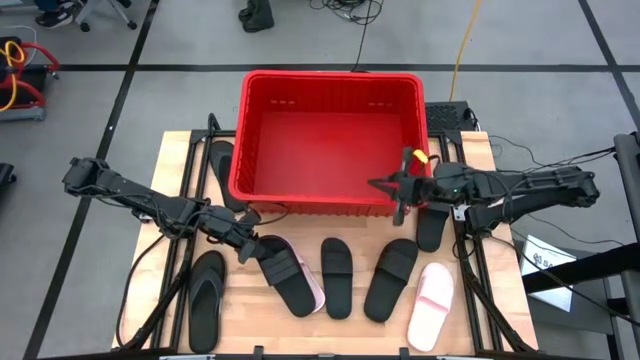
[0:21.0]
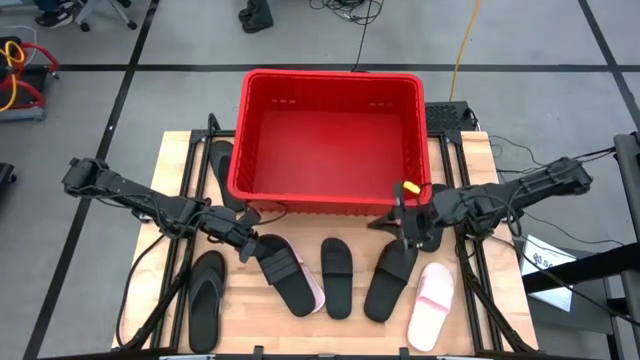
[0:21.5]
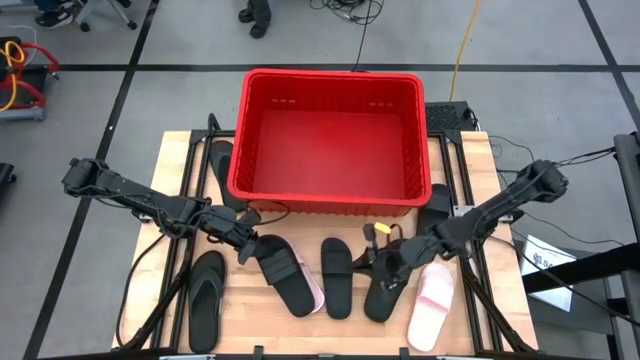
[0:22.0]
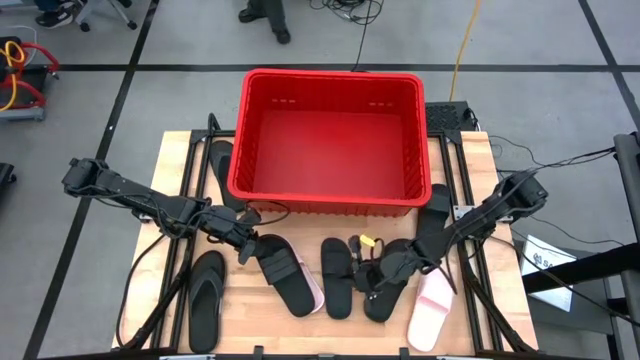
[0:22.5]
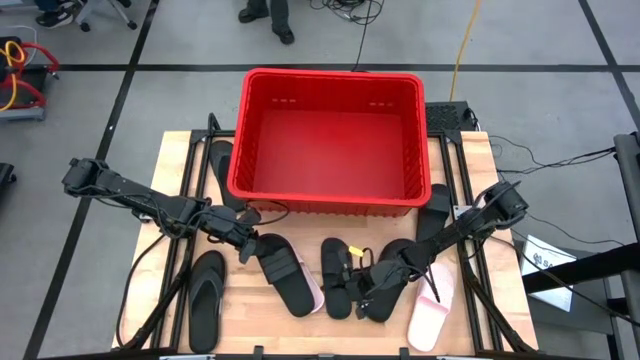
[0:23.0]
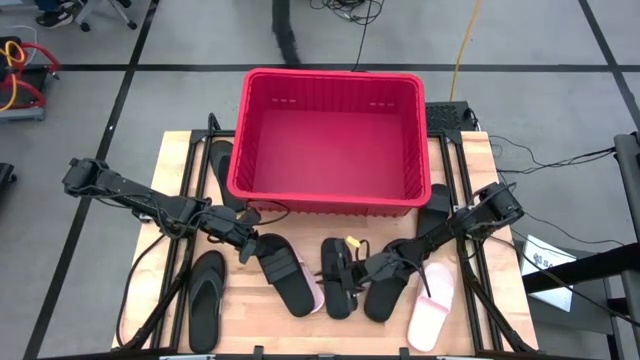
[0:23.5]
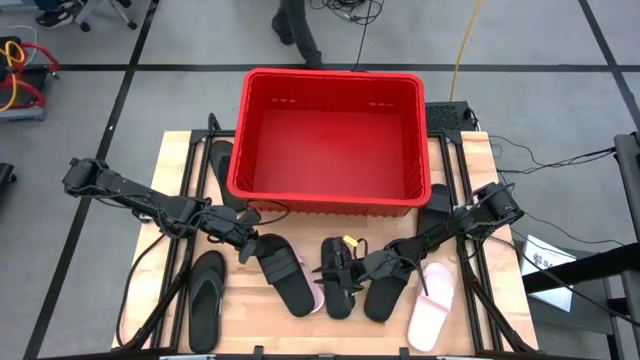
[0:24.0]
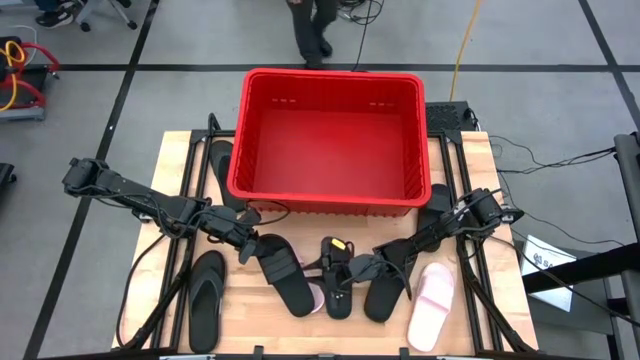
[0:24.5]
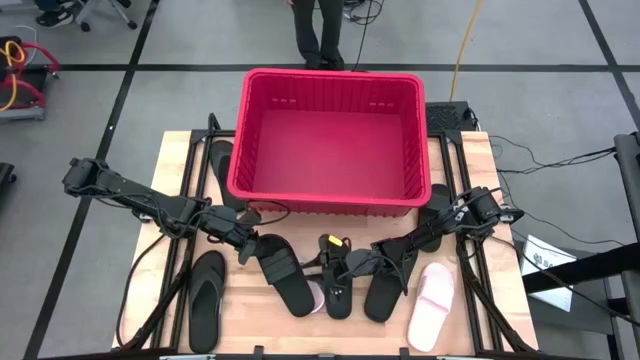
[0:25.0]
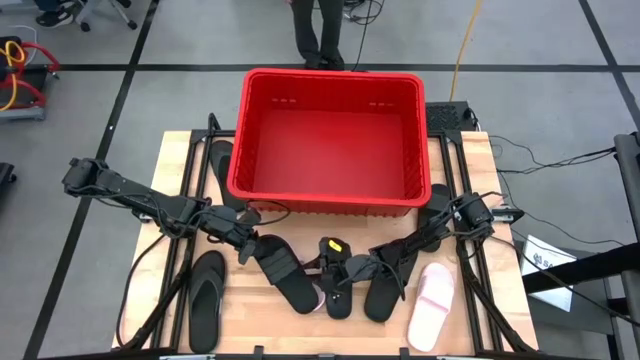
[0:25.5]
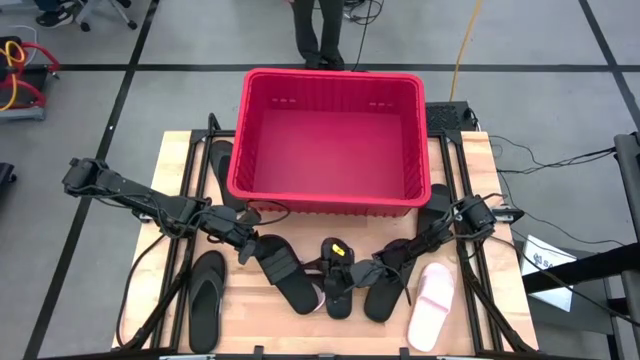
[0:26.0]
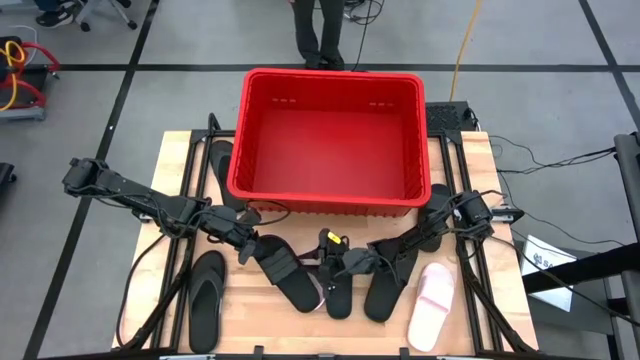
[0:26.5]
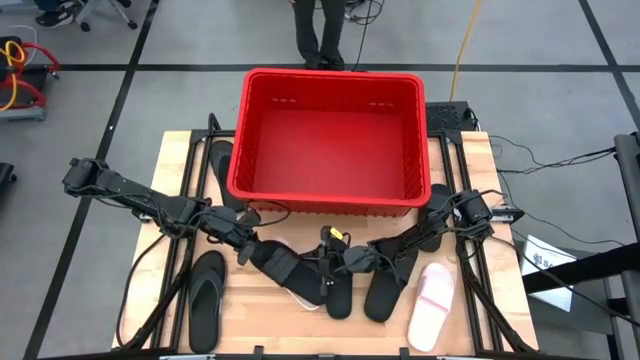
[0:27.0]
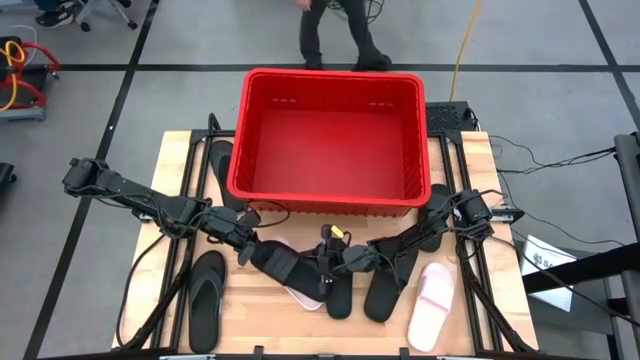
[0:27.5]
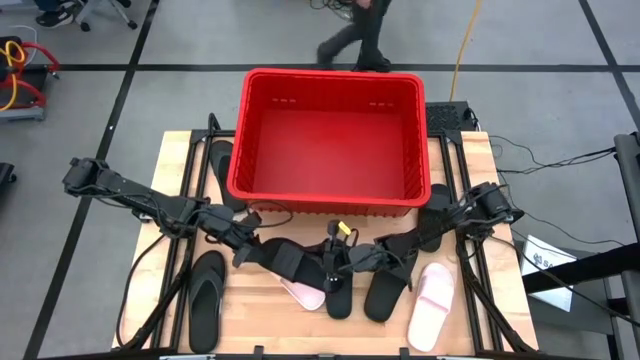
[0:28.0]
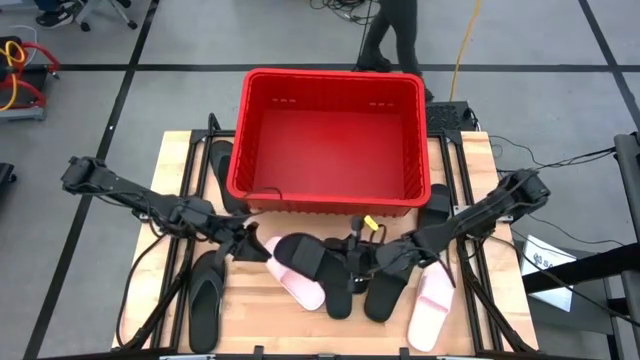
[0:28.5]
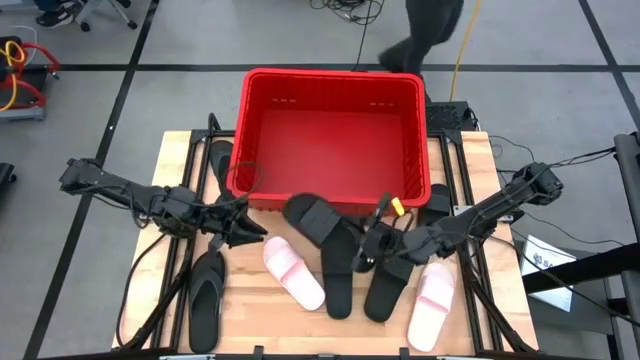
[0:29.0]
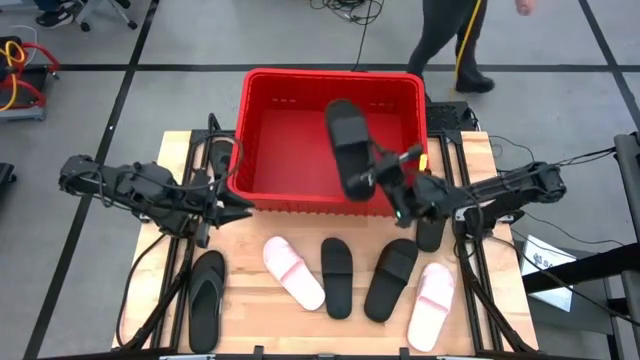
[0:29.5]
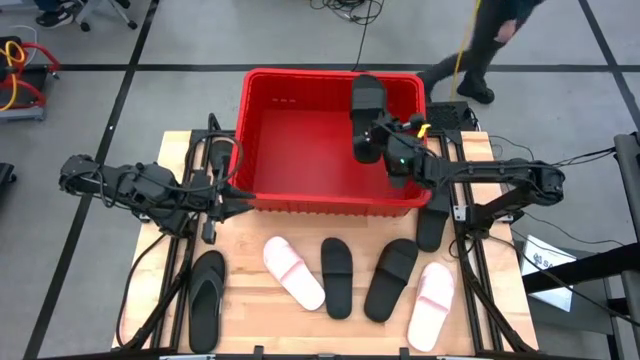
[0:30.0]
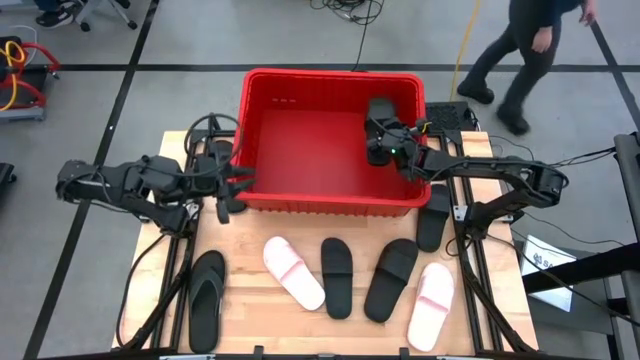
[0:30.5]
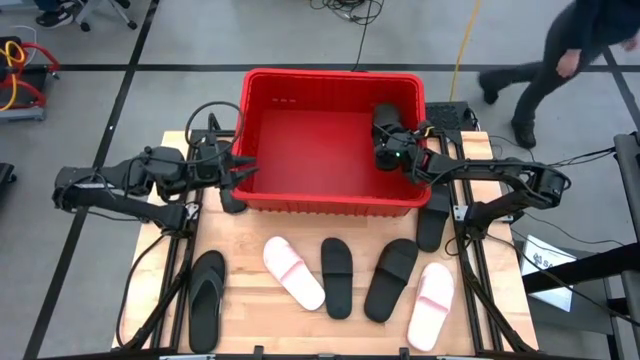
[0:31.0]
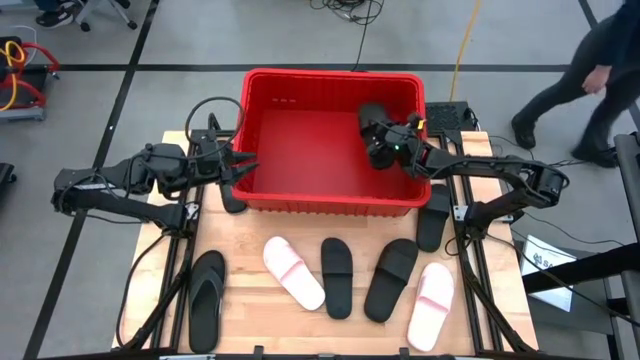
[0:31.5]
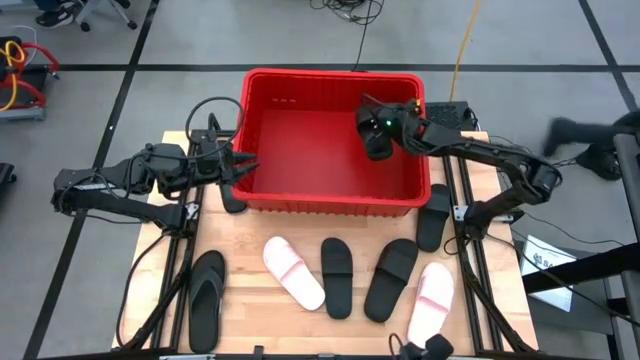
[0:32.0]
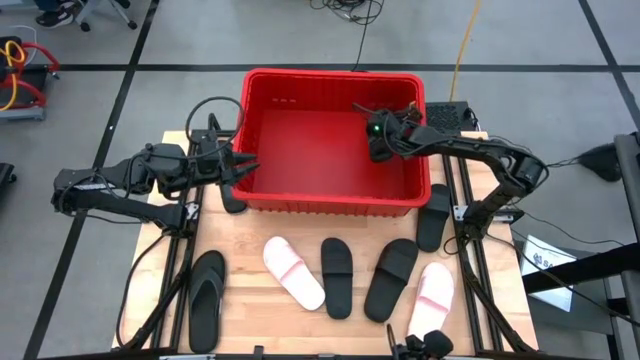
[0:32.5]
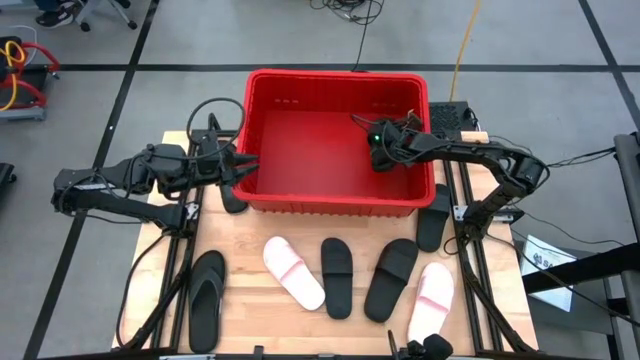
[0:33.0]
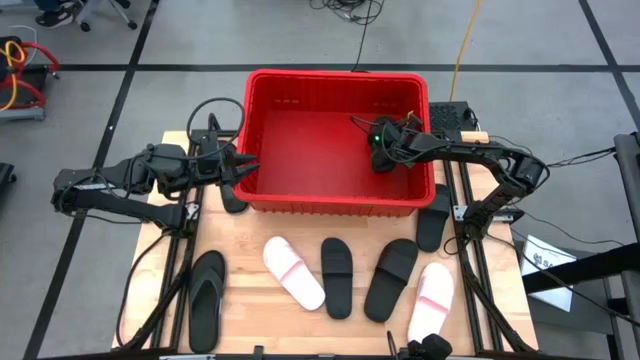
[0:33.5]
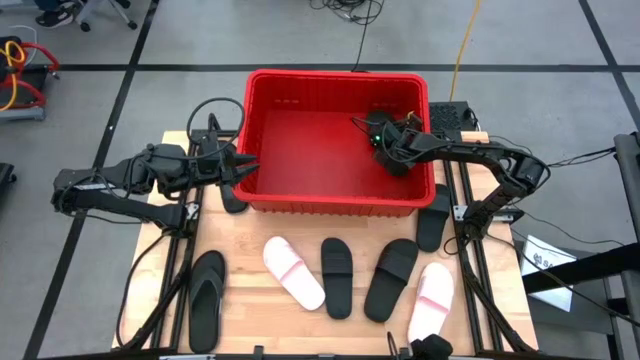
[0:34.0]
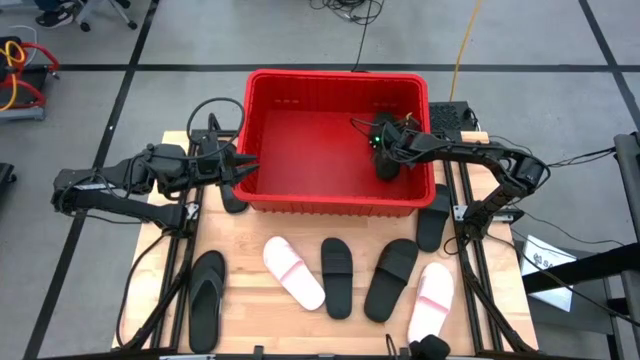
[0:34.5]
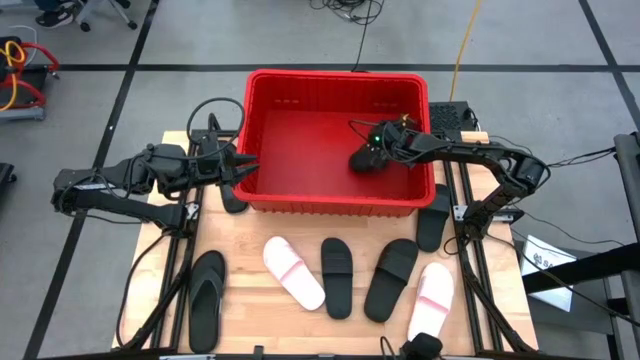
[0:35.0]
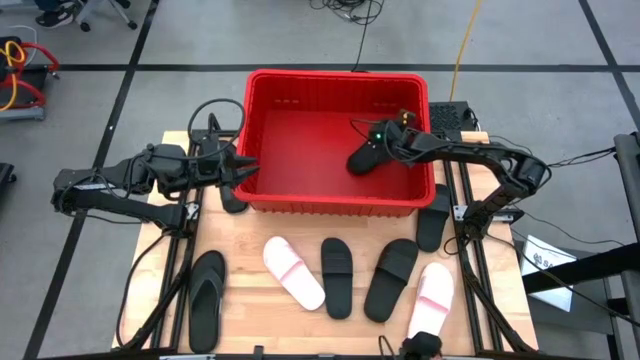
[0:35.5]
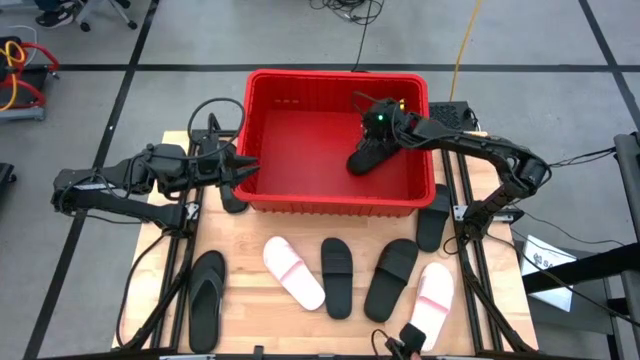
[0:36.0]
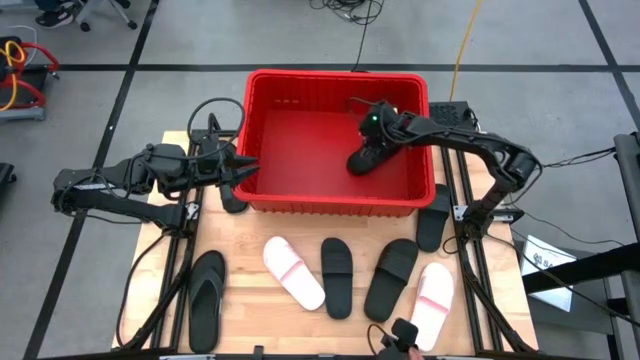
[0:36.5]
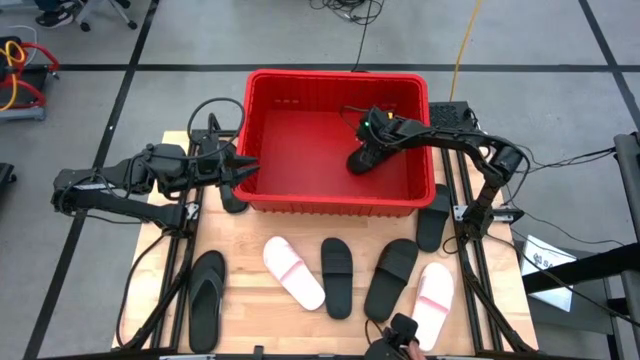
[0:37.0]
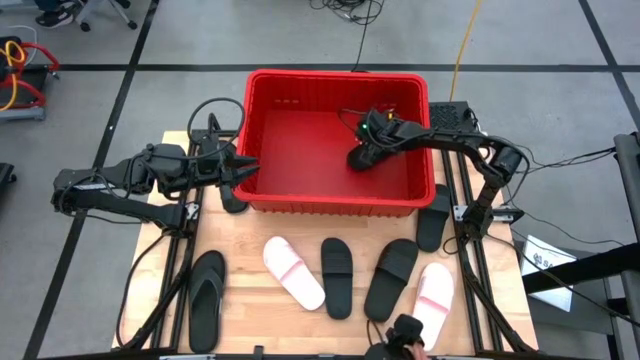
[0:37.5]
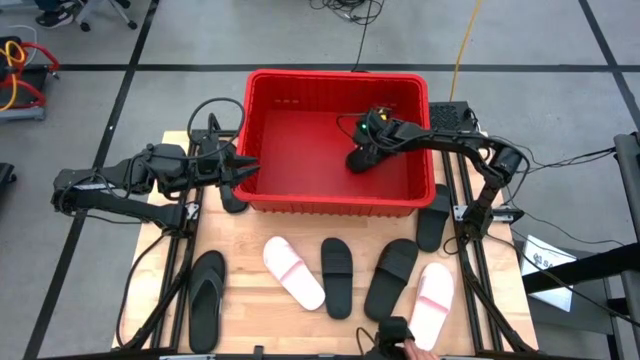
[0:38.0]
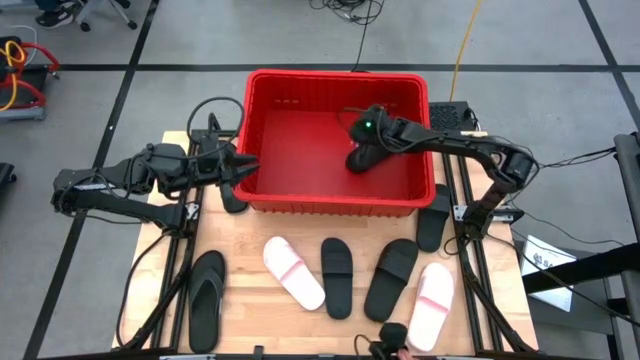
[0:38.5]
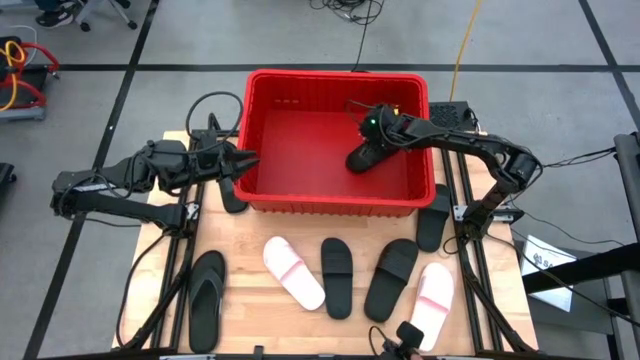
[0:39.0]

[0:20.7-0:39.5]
Task: Pick and place slides into bin
Put the black slide into the red bin

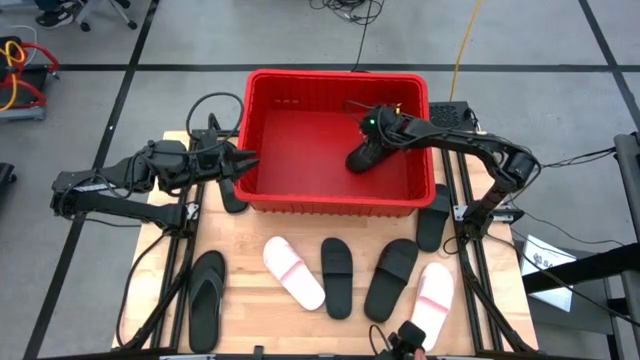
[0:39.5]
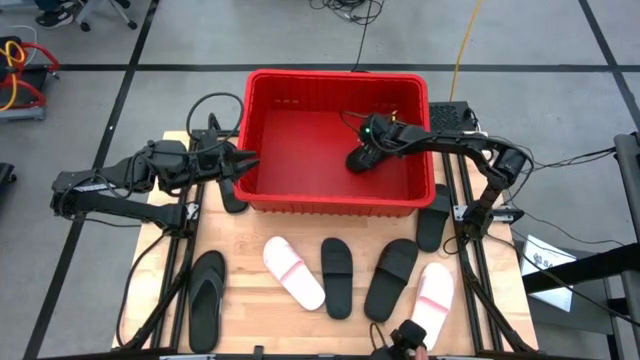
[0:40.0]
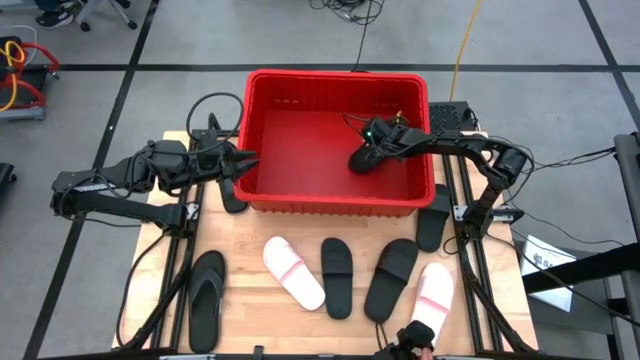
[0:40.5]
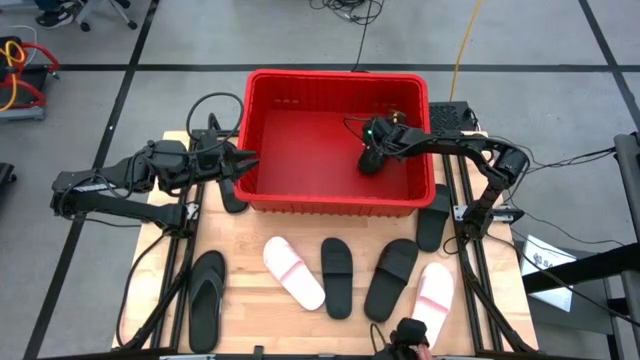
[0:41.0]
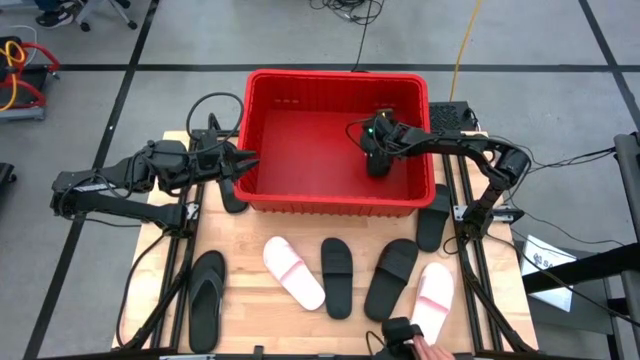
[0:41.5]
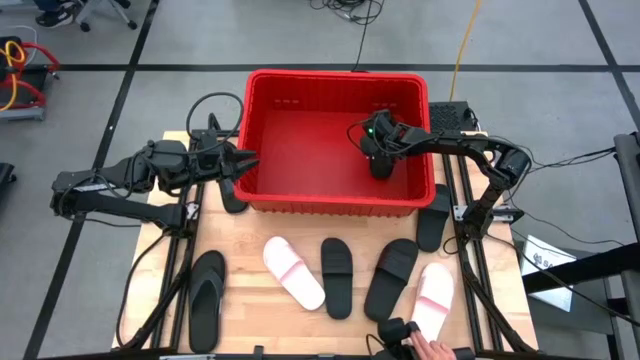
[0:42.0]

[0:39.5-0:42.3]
Put the black slide into the red bin
